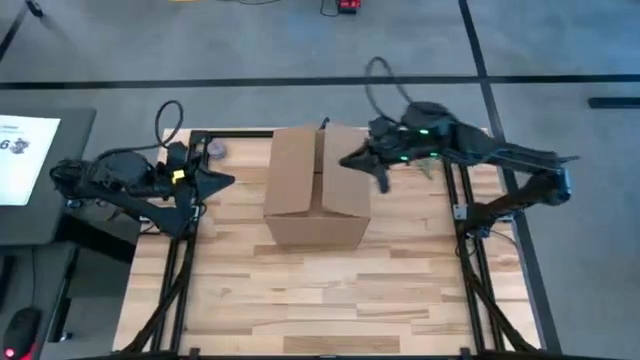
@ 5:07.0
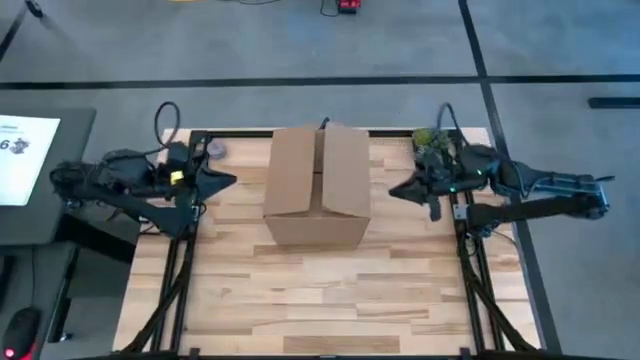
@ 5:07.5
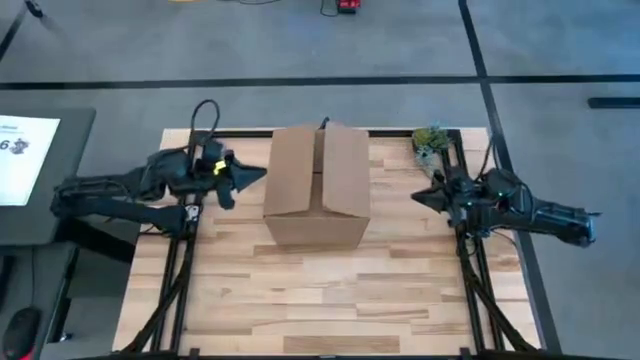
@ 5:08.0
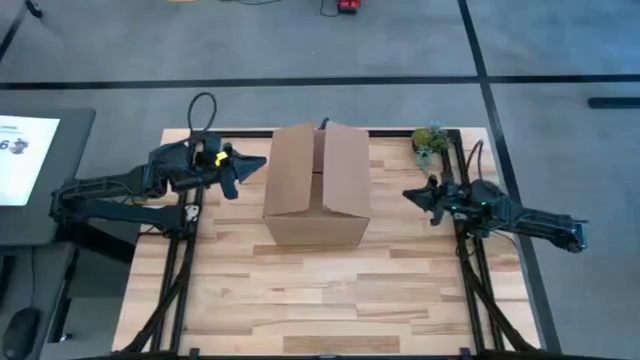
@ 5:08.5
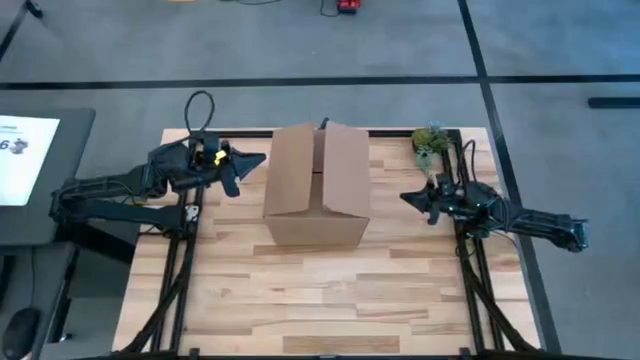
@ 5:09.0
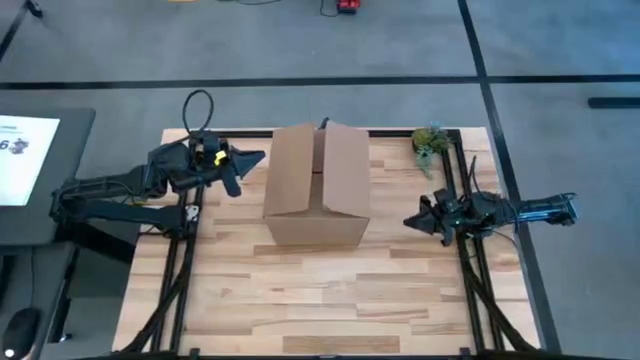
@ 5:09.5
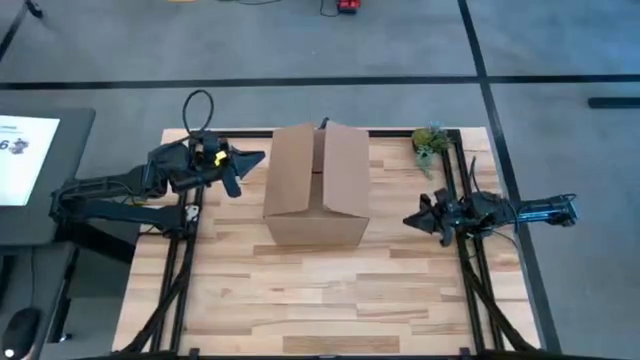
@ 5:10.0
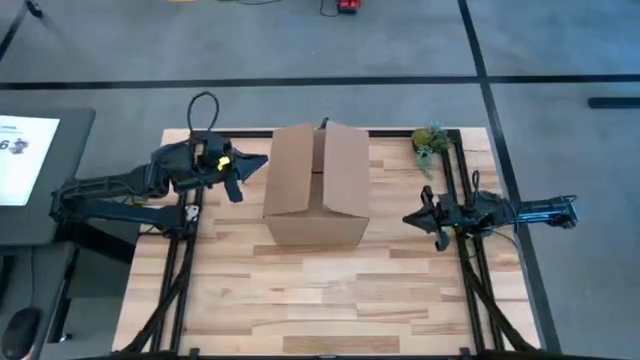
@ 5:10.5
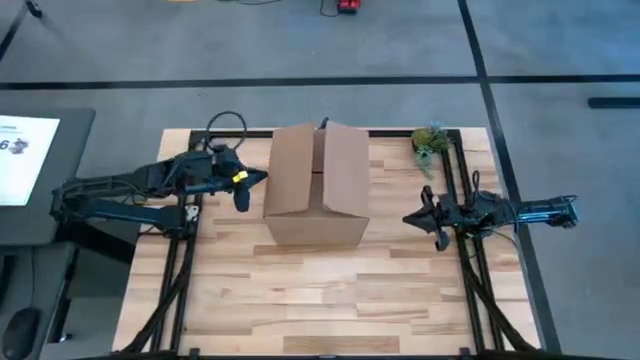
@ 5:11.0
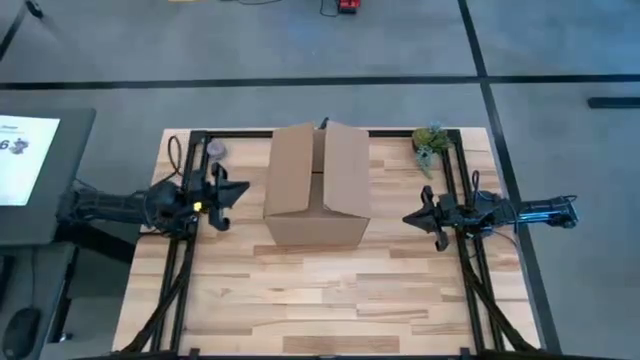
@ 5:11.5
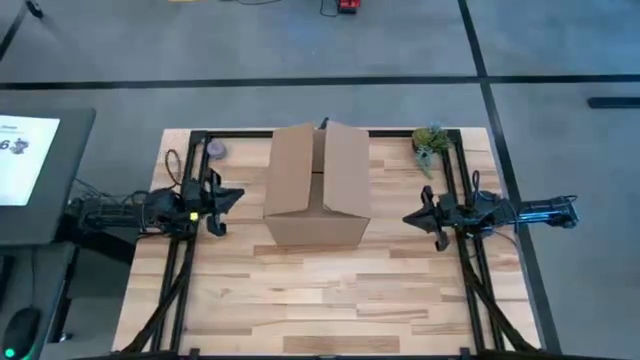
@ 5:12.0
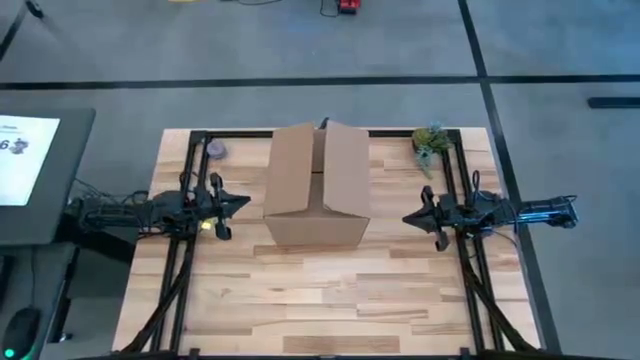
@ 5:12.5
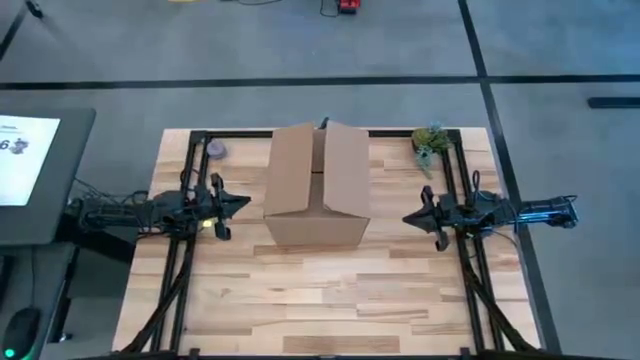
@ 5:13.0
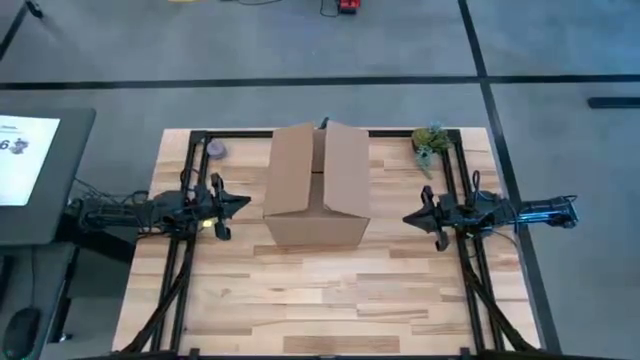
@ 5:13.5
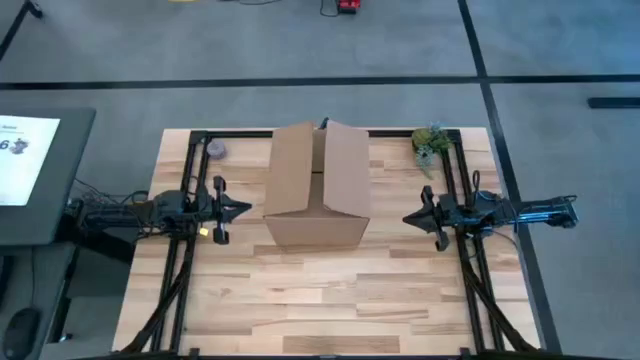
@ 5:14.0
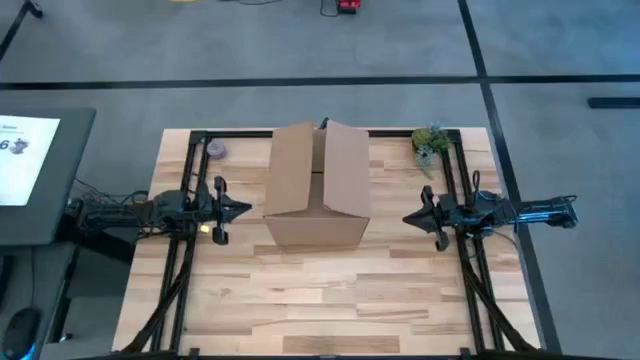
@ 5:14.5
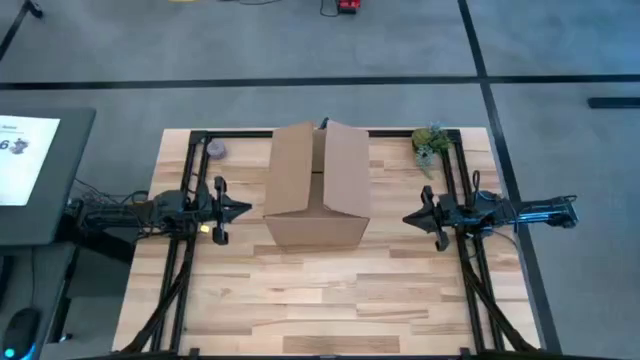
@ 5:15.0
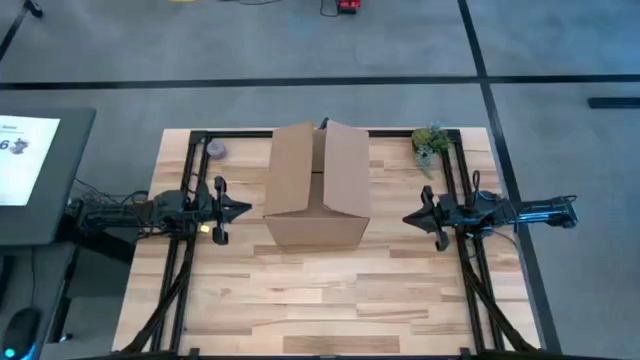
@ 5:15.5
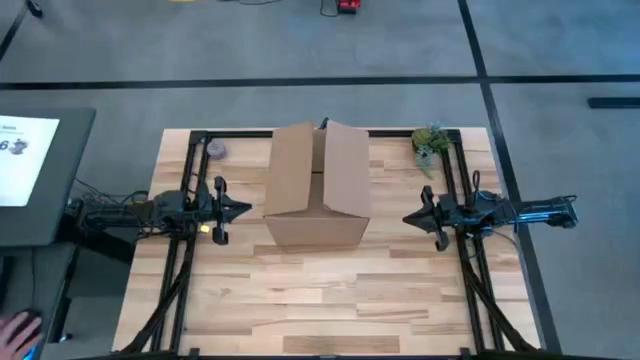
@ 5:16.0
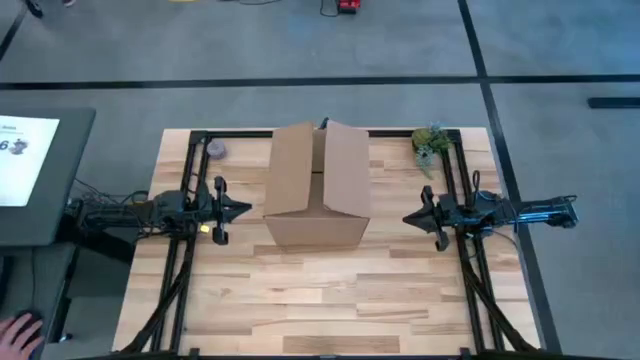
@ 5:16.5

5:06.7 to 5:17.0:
Task: wrap mug
Return to Home Position

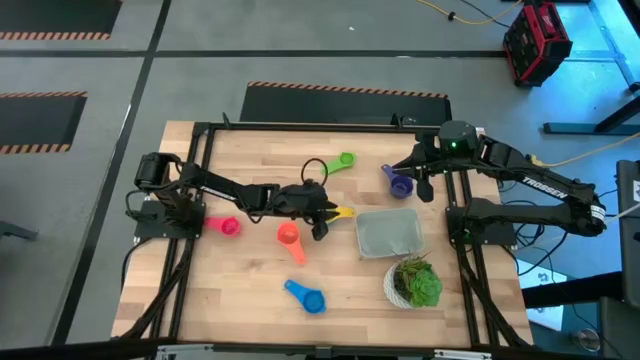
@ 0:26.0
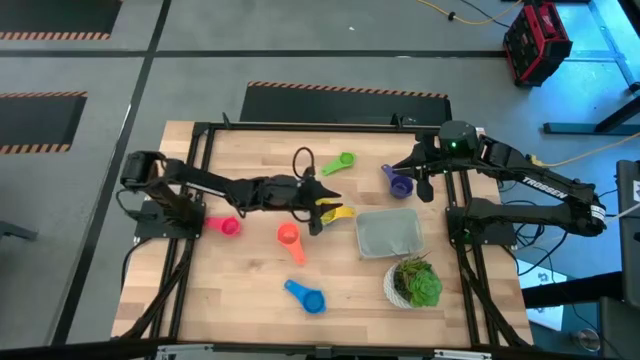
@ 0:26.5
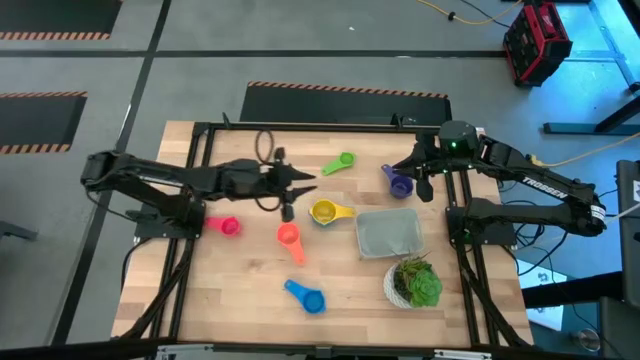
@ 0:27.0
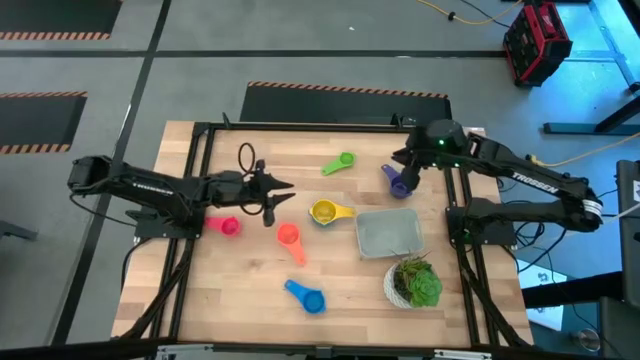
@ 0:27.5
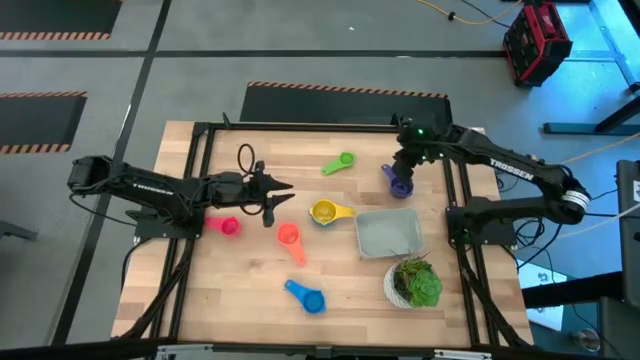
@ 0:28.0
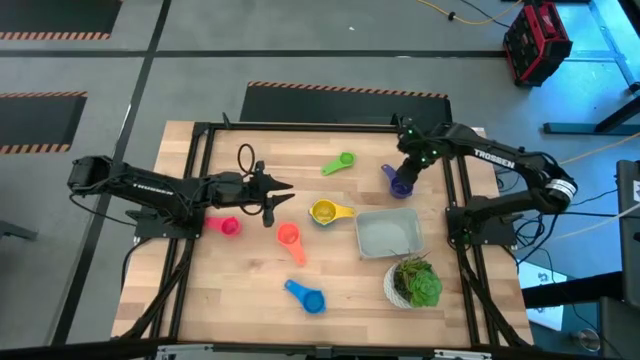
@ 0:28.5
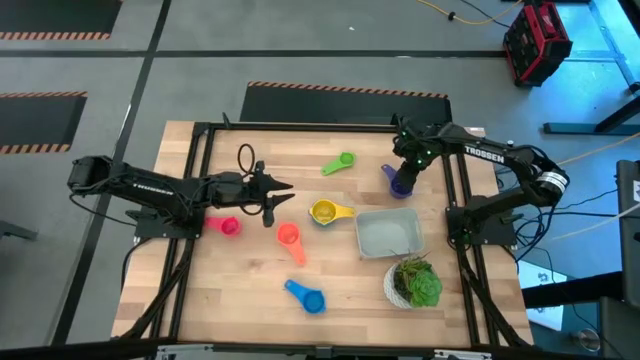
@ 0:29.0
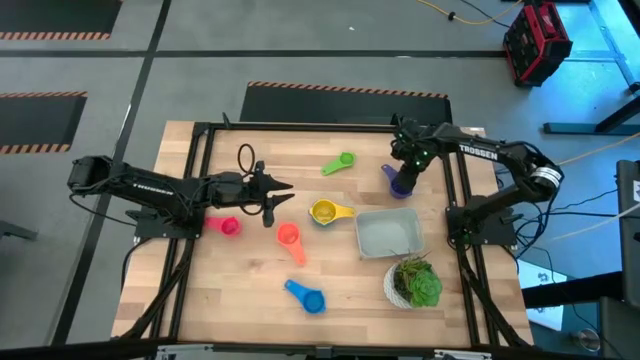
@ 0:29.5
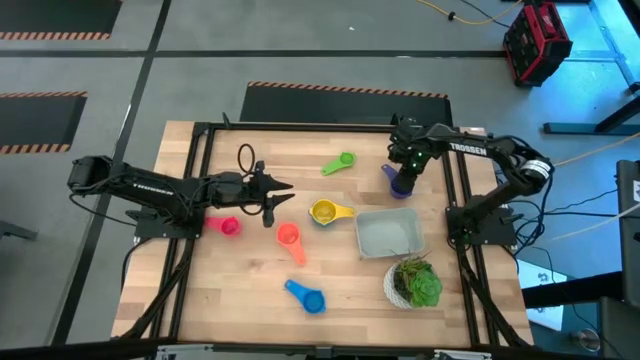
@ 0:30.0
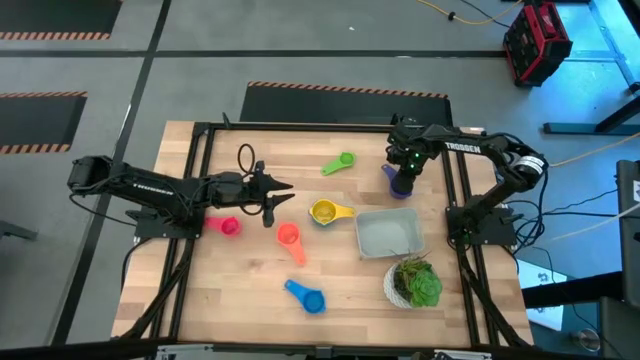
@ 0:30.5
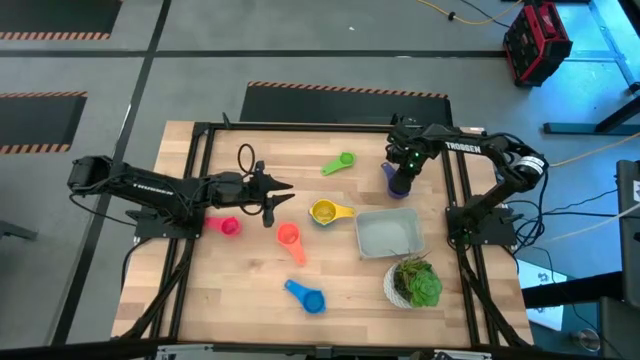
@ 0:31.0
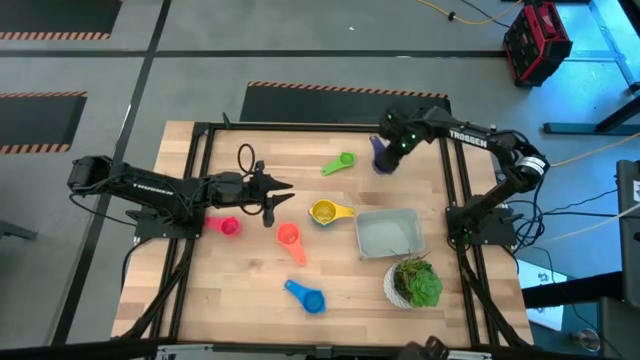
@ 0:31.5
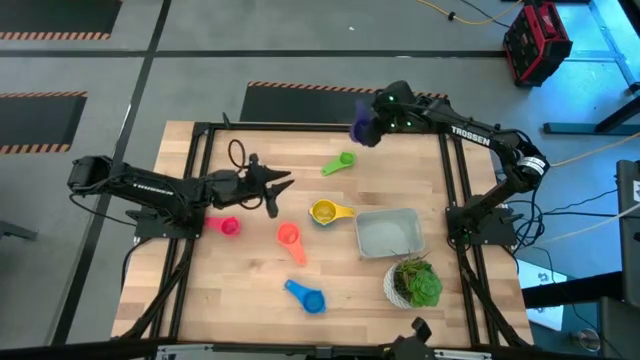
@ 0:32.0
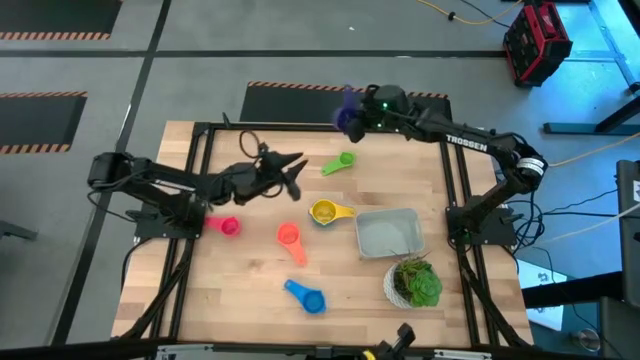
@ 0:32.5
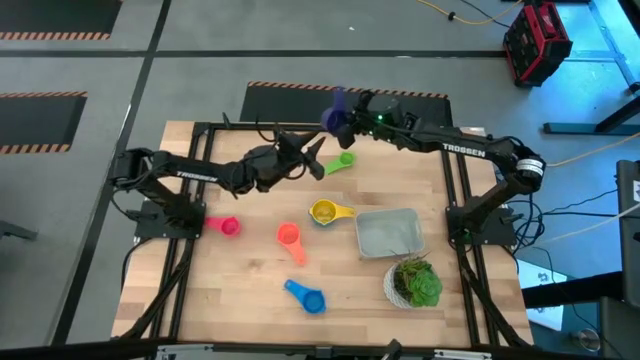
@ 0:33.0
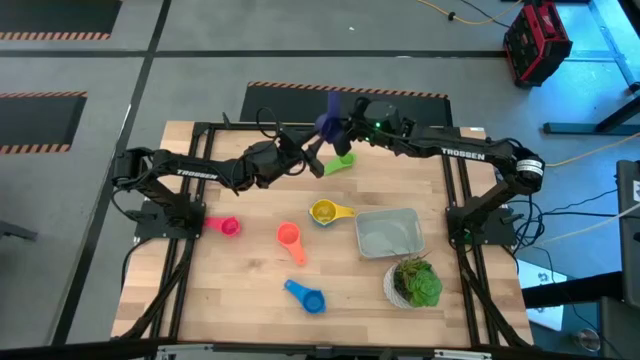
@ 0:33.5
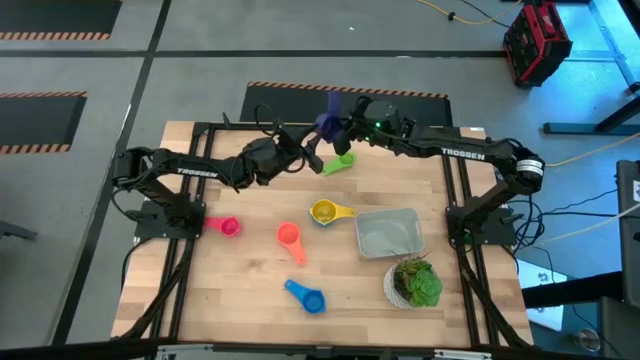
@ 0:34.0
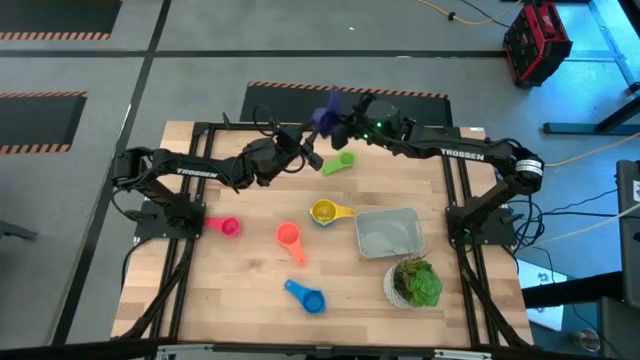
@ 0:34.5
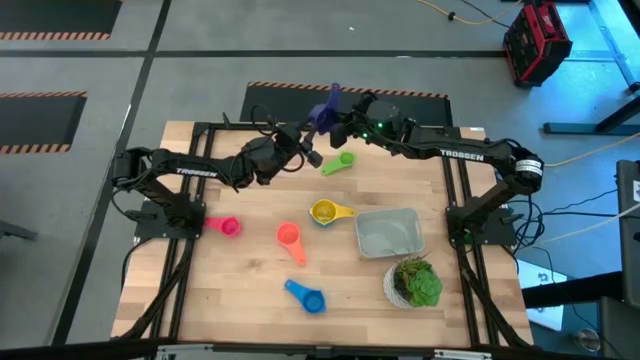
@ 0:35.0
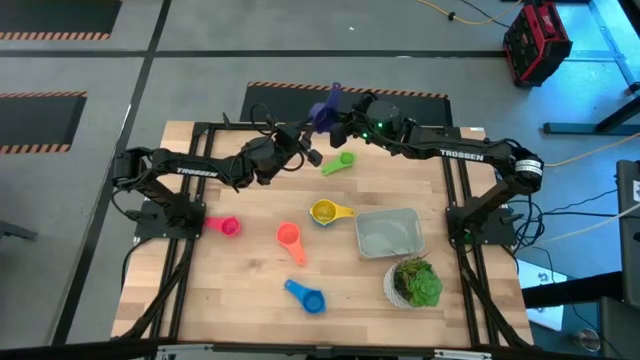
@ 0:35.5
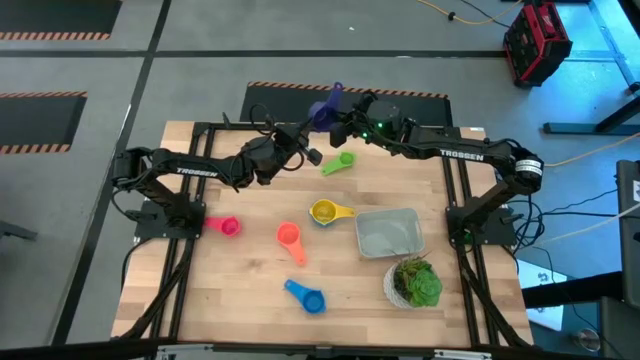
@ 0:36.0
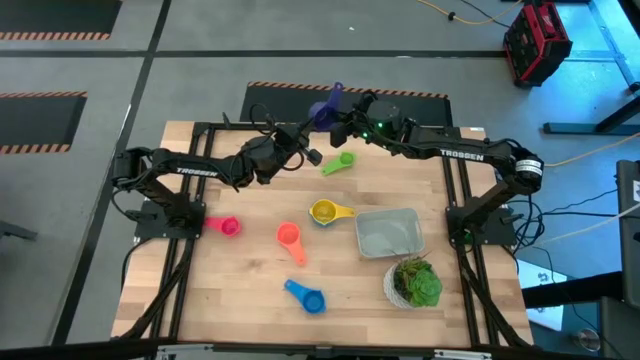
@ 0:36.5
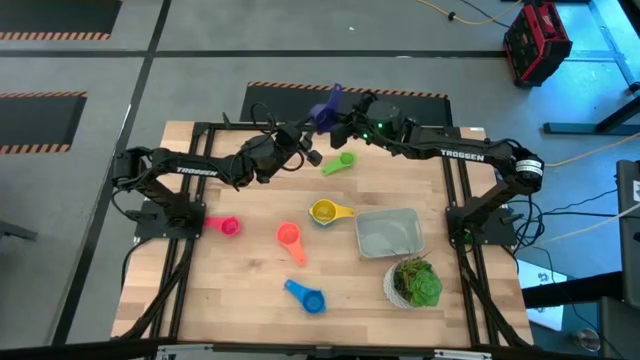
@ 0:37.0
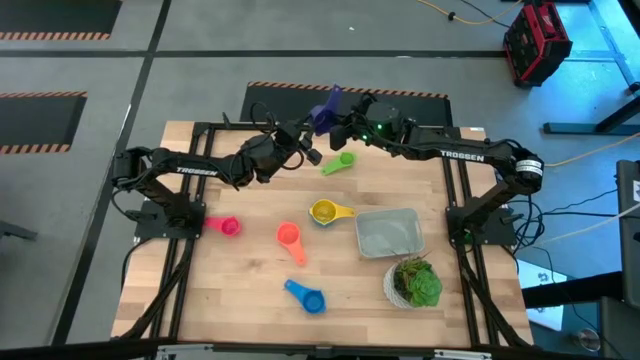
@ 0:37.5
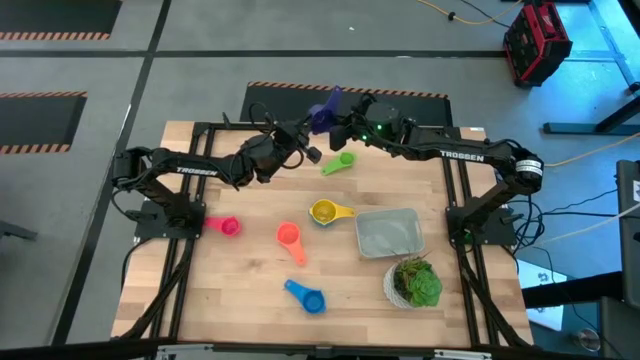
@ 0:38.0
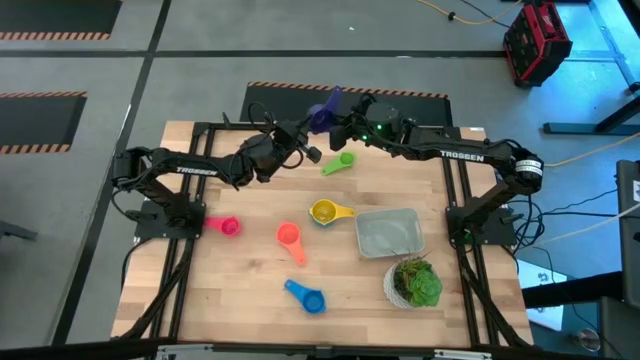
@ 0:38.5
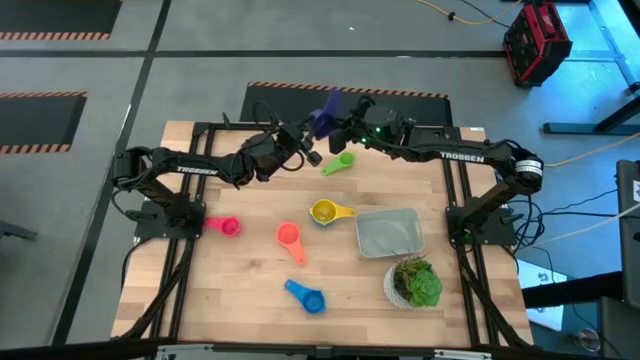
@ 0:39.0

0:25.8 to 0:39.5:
Task: Nest measuring cups in basket
Stack the violet measuring cup on top of the yellow measuring cup
